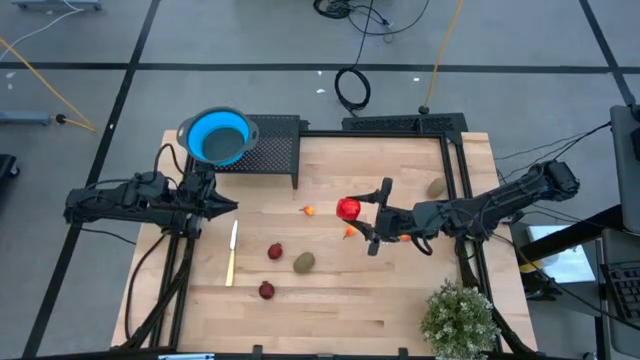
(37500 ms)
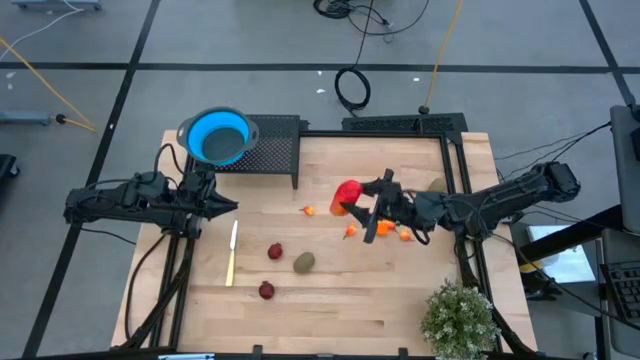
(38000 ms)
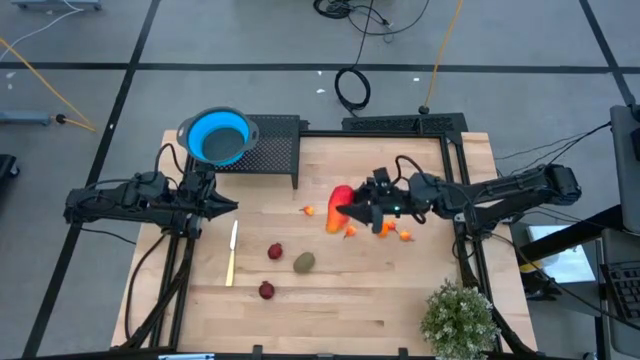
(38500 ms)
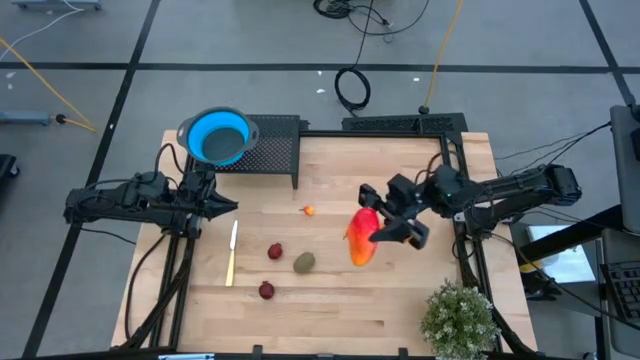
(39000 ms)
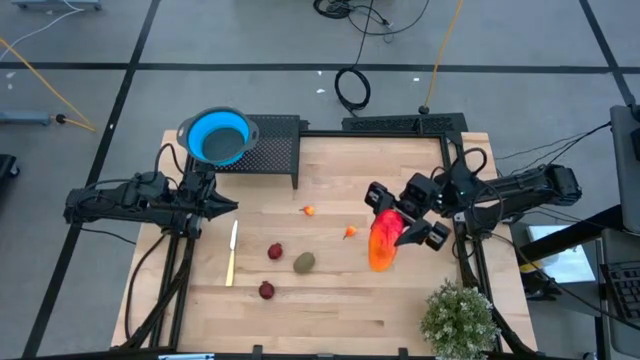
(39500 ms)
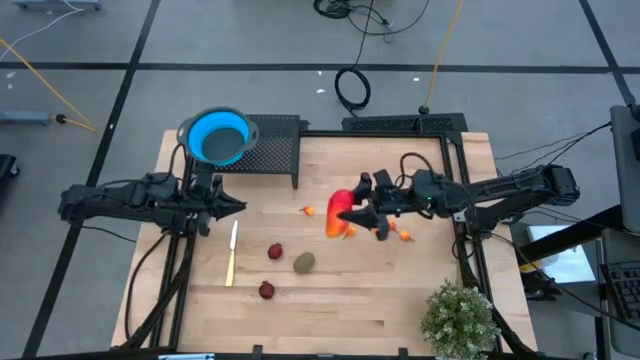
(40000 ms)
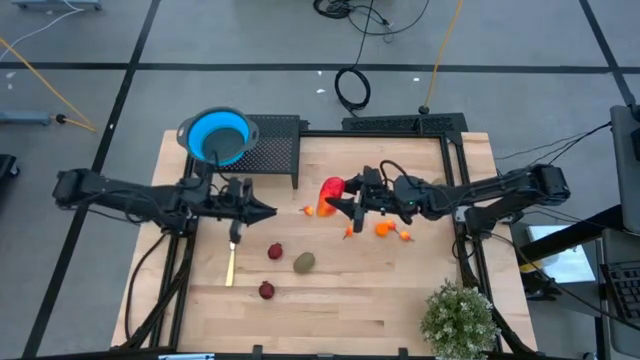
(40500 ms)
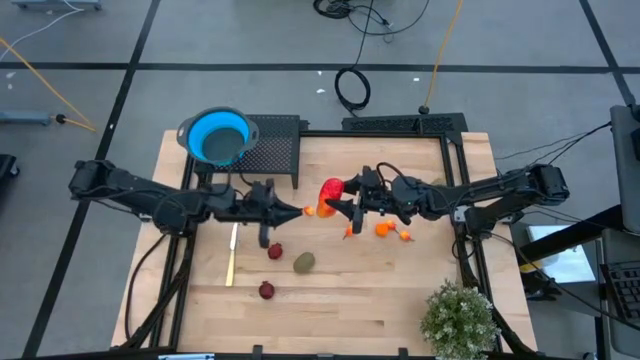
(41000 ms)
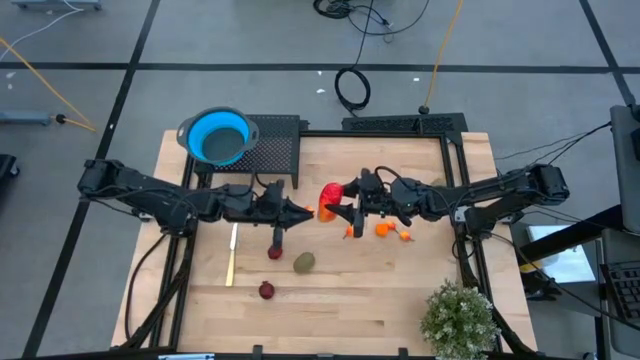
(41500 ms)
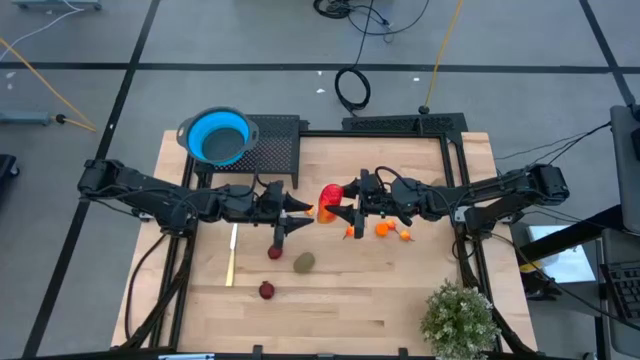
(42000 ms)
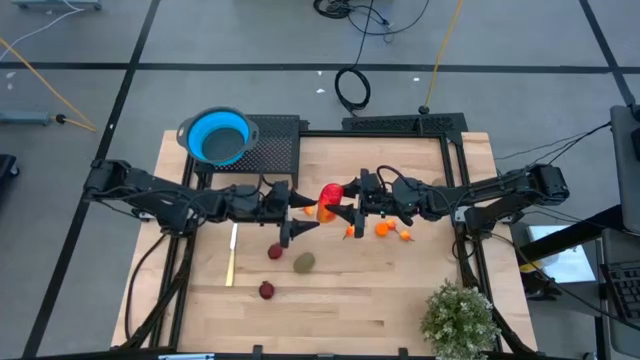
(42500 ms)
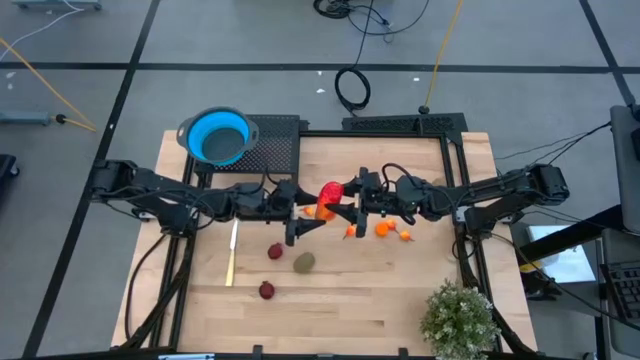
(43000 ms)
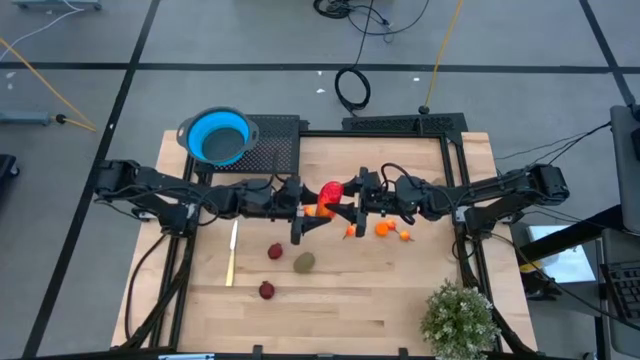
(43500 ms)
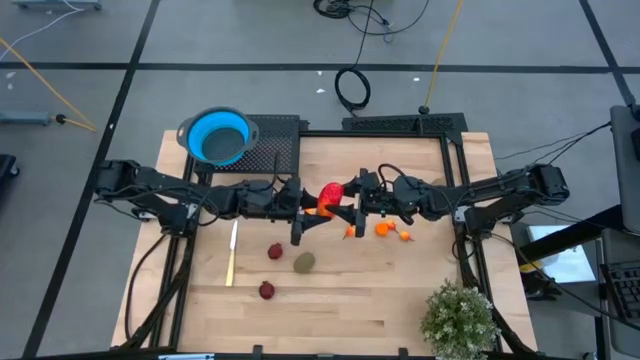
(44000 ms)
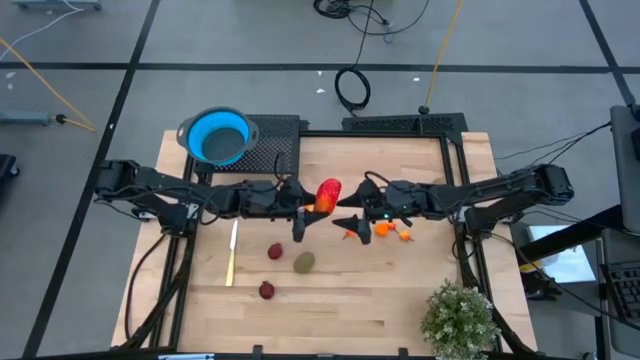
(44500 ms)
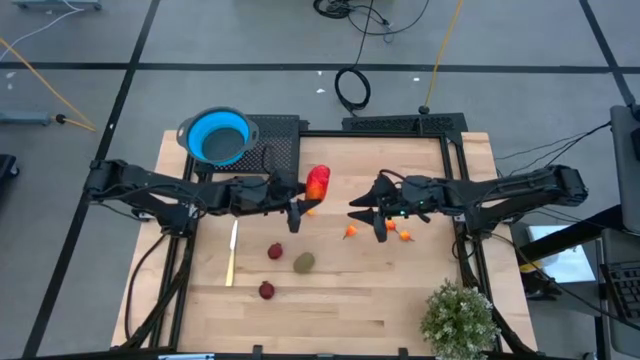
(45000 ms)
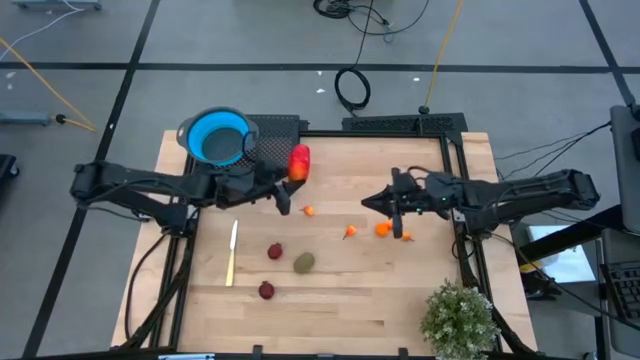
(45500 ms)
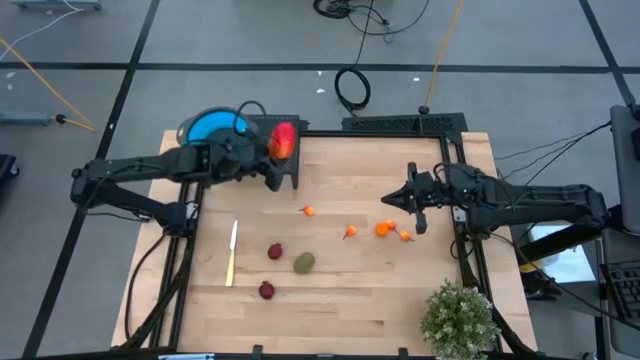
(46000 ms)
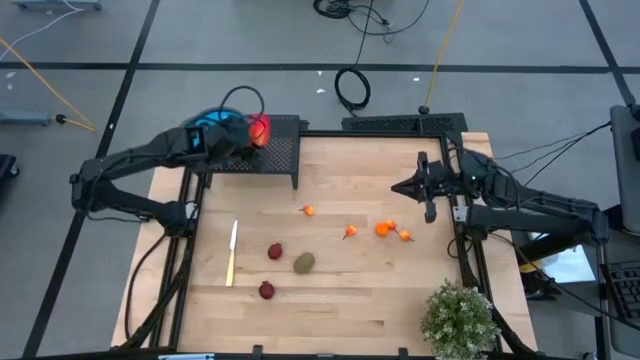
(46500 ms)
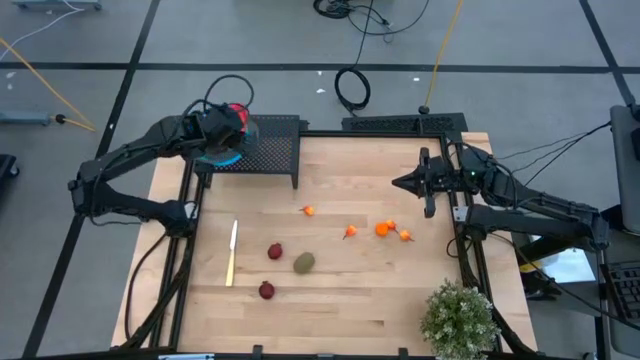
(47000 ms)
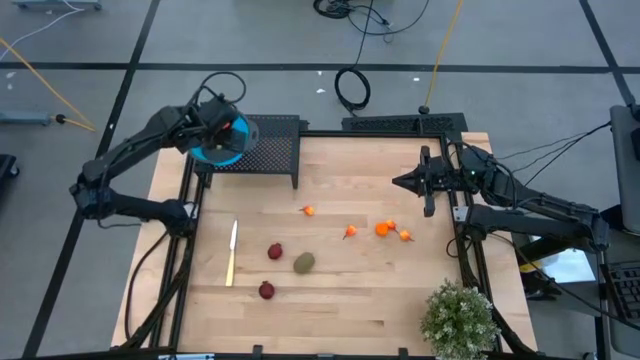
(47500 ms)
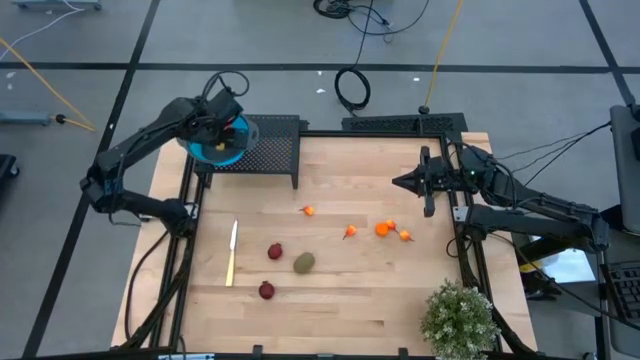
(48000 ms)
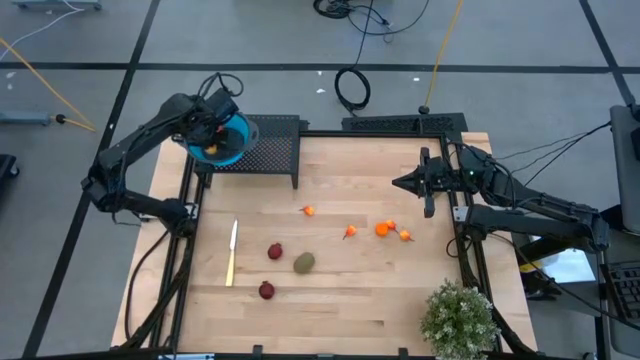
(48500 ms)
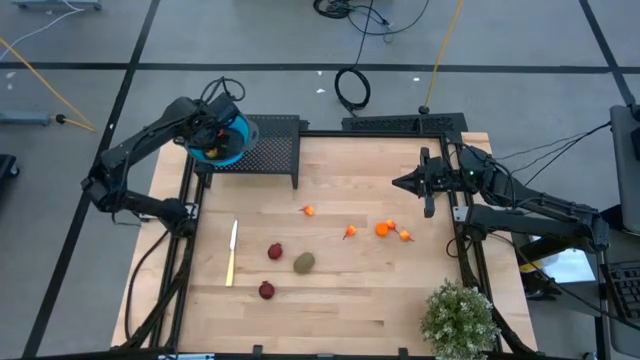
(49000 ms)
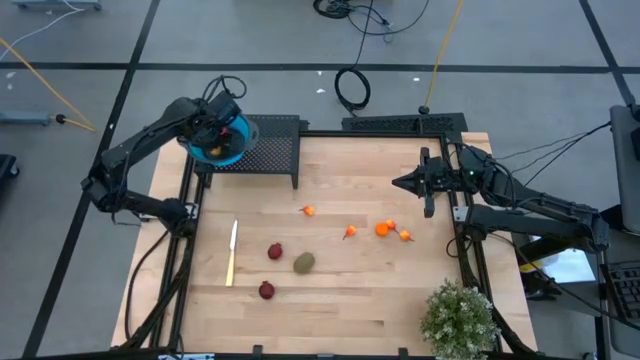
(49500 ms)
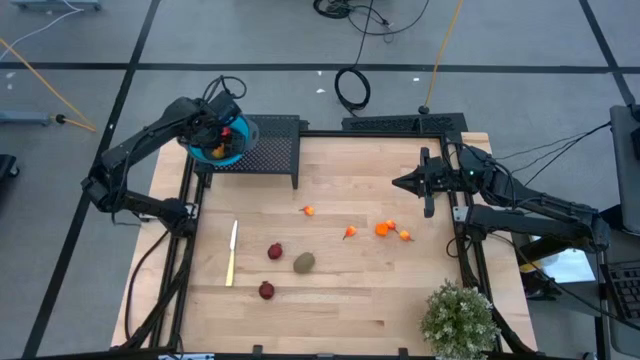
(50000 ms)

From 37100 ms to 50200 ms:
Task: Pick & Place Fruit
Put the mango into the blue strainer bowl on the shelf
